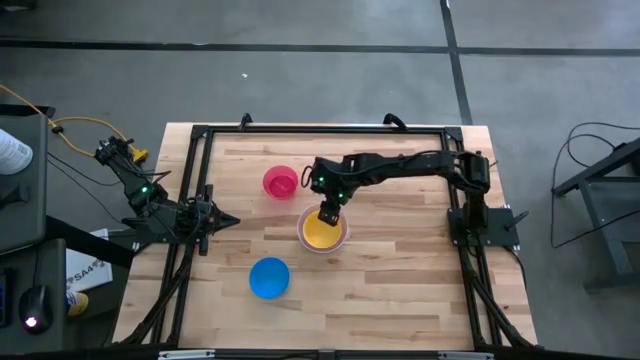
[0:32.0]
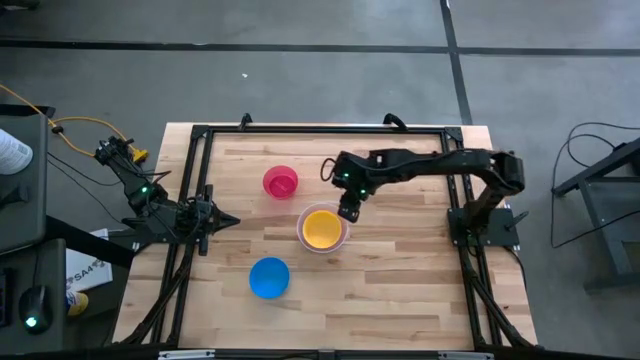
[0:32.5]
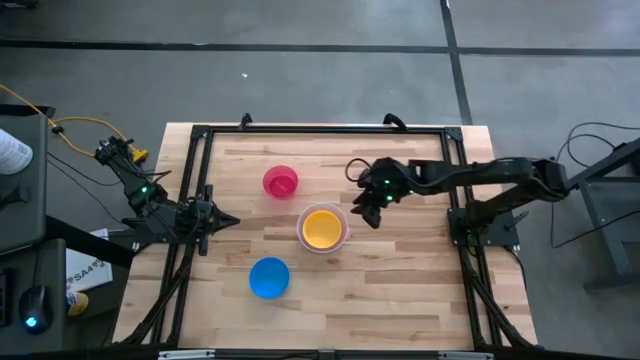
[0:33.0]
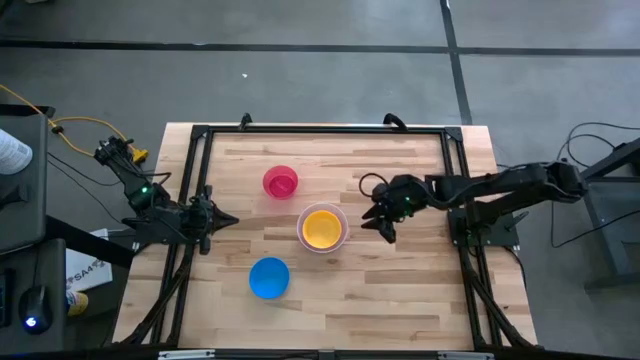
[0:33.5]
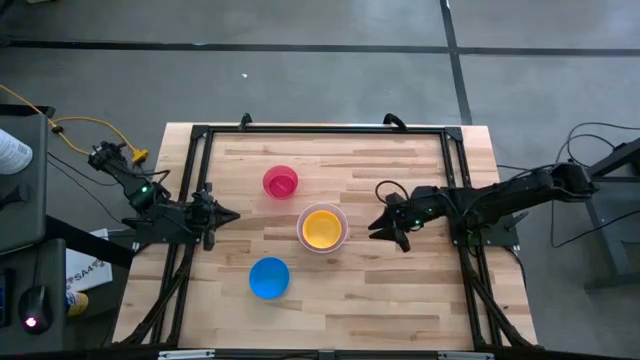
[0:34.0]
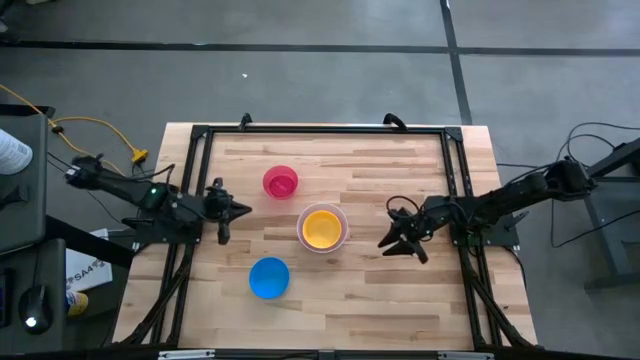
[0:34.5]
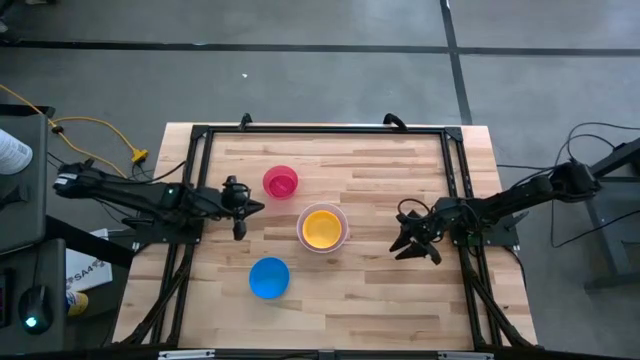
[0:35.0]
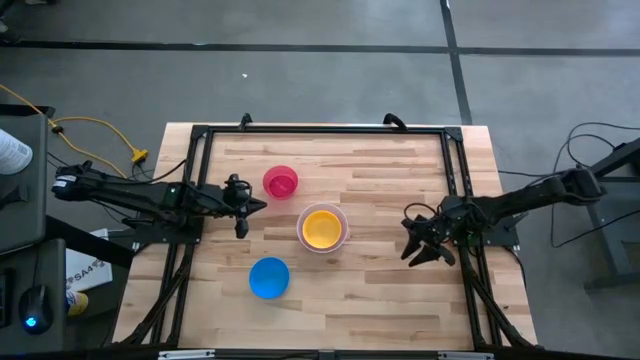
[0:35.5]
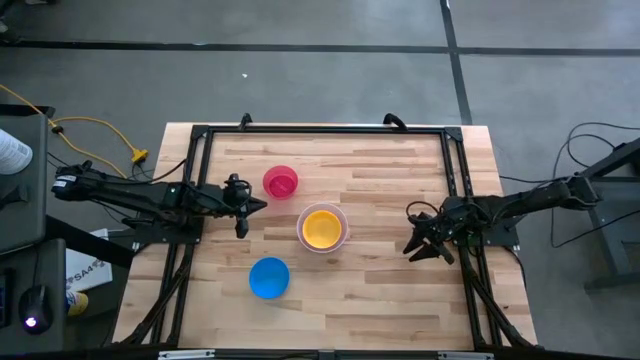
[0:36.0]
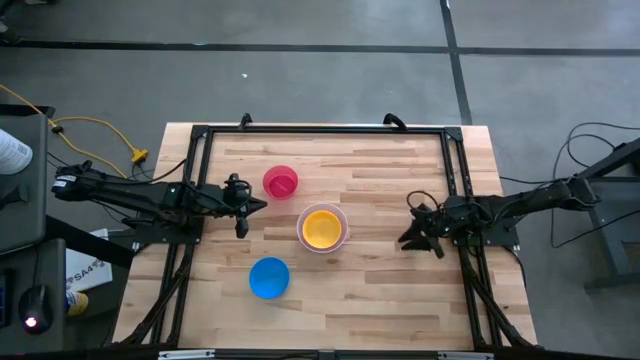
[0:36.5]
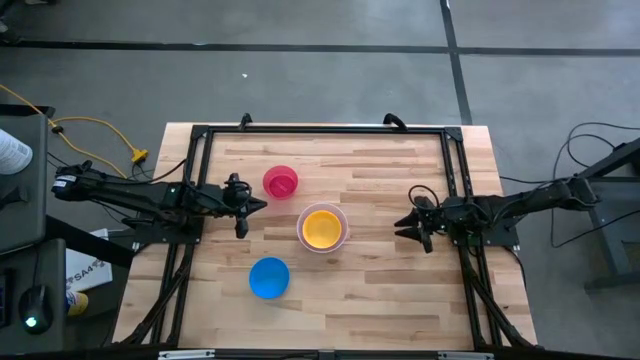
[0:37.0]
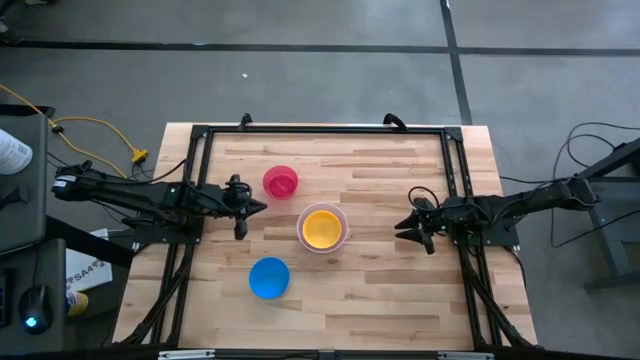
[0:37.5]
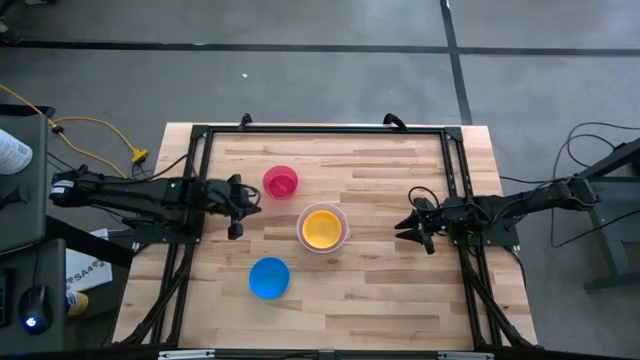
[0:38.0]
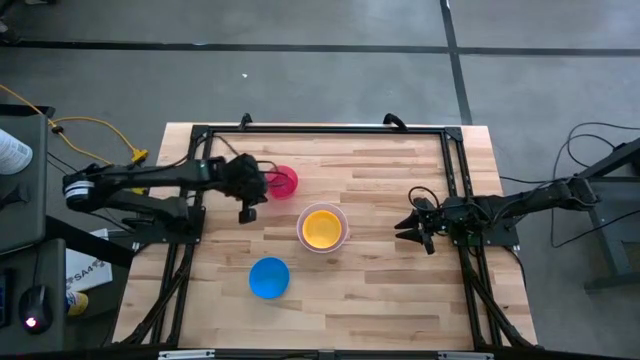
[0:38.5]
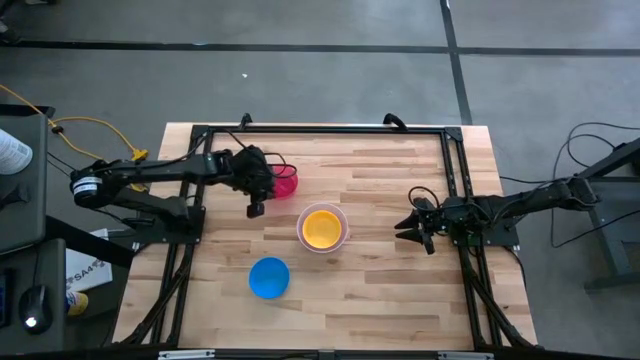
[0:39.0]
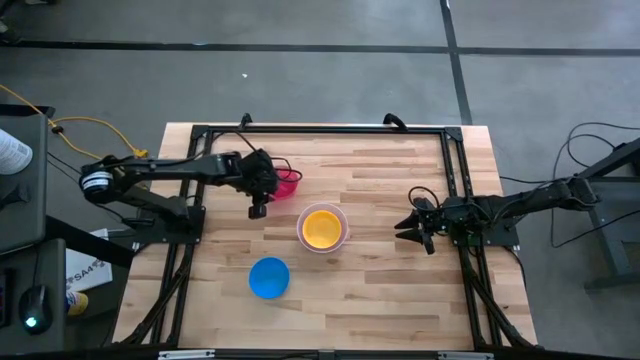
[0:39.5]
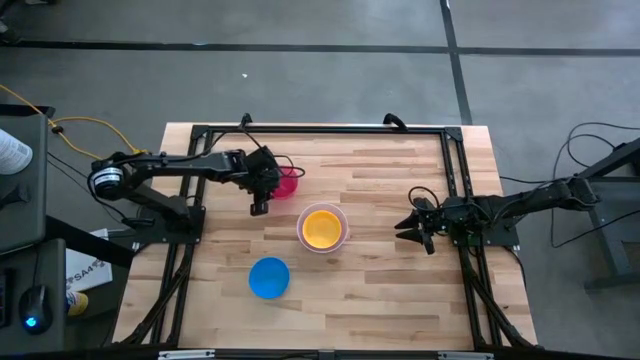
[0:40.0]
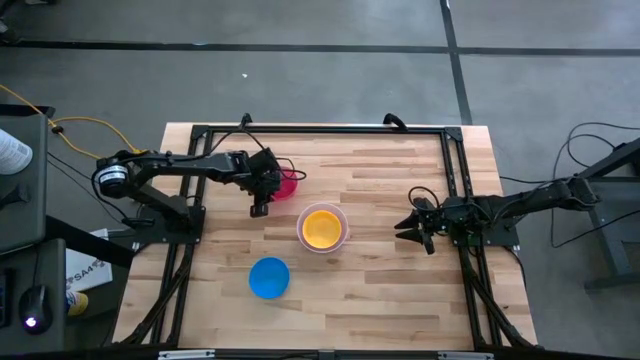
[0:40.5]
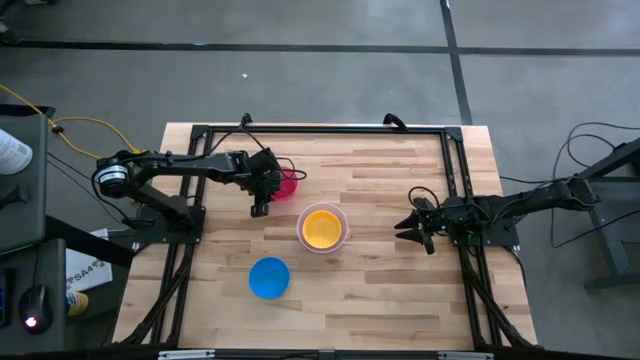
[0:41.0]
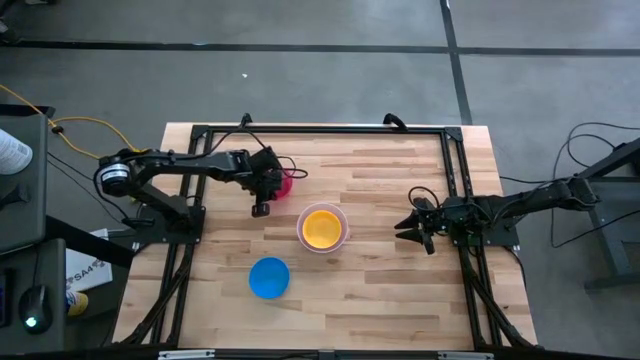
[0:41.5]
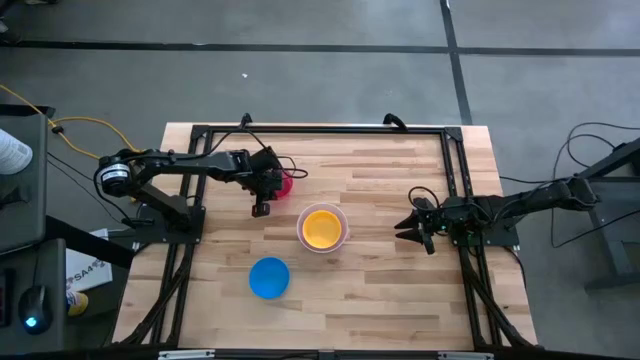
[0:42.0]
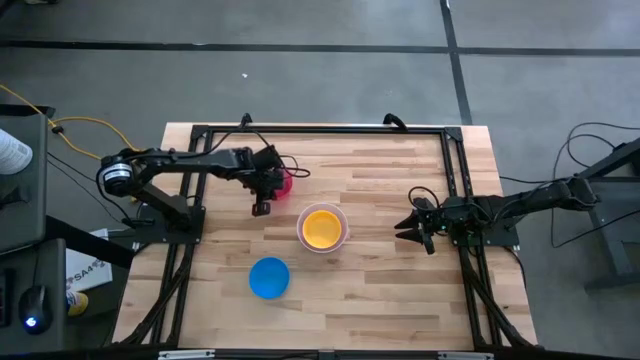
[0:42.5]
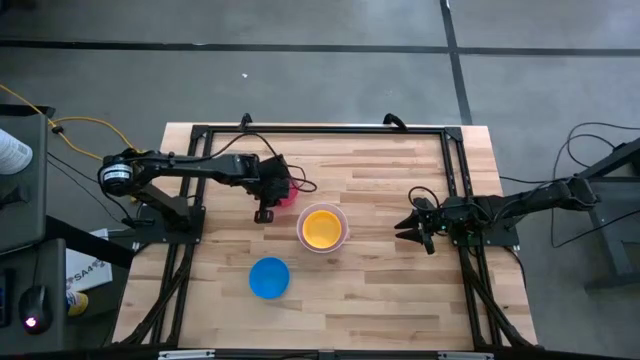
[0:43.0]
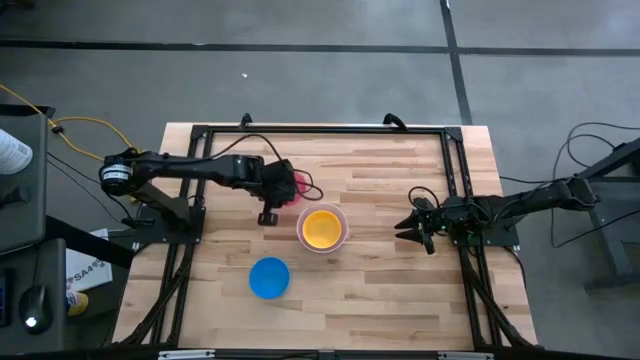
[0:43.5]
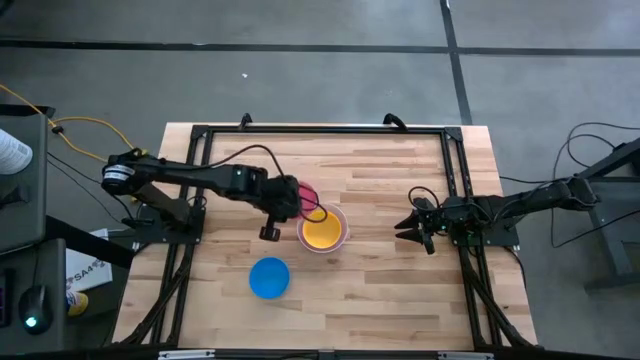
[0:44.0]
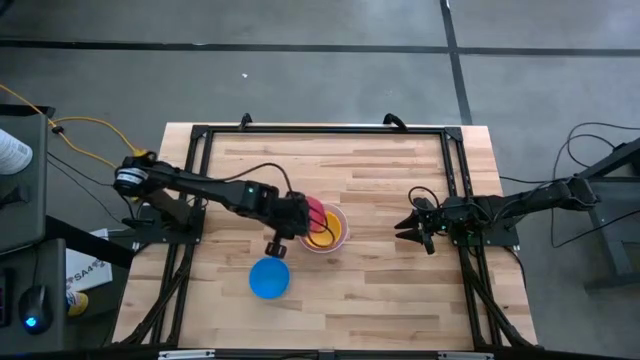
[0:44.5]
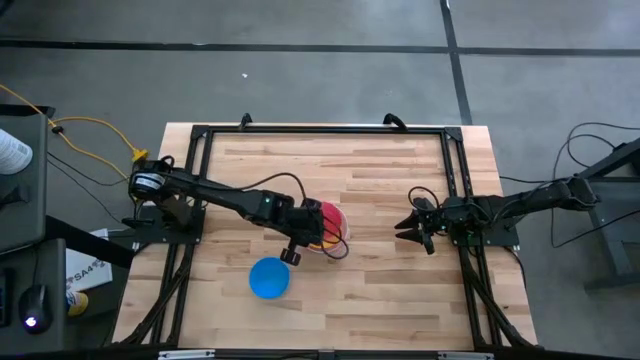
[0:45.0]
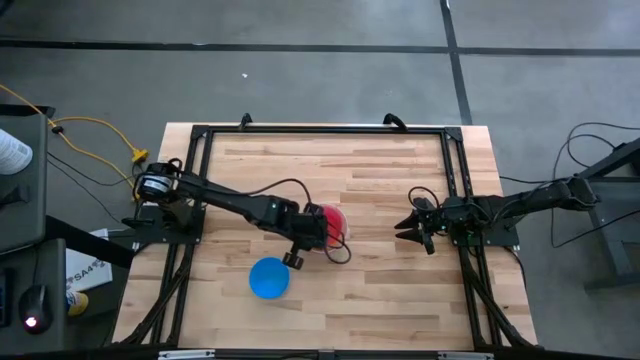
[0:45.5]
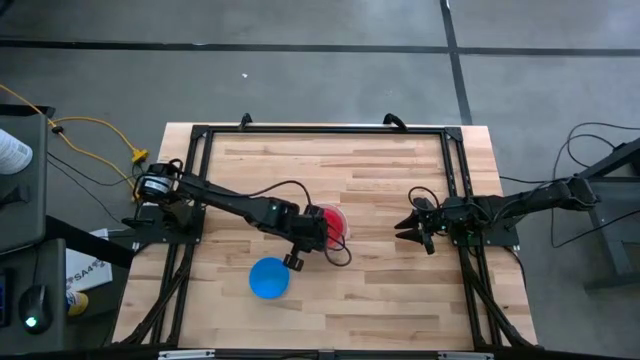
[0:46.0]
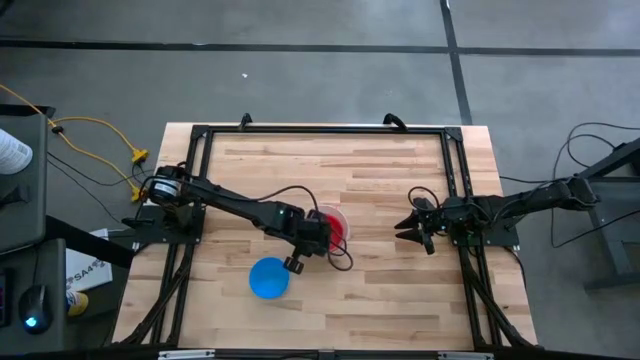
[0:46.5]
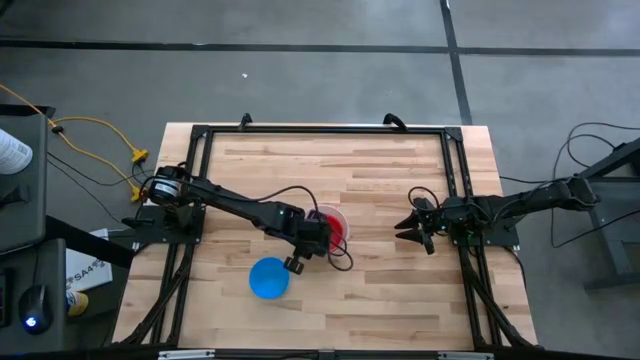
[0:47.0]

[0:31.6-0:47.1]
Stack the red bowl on the yellow bowl
